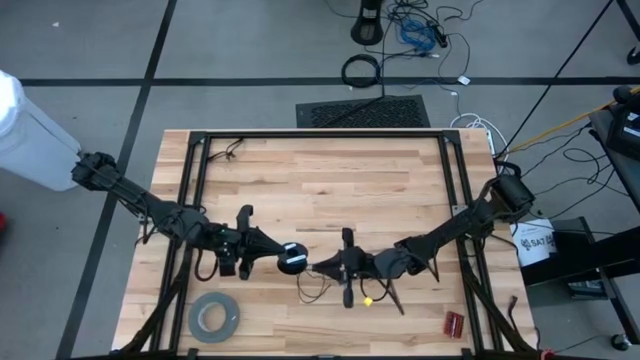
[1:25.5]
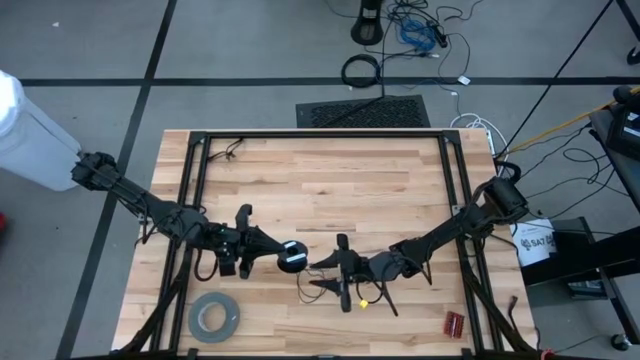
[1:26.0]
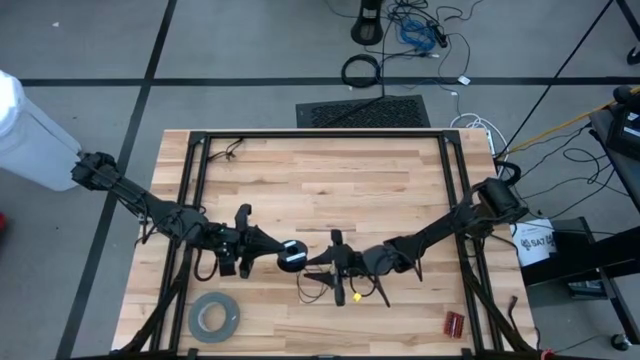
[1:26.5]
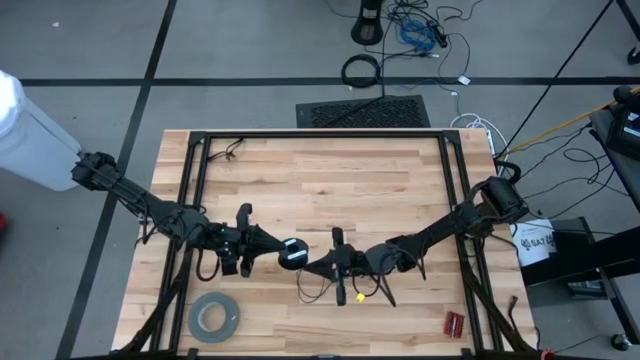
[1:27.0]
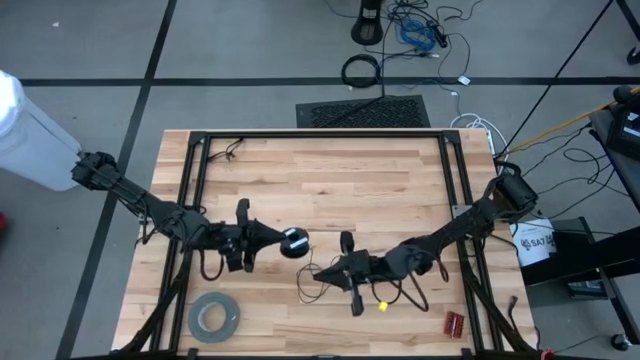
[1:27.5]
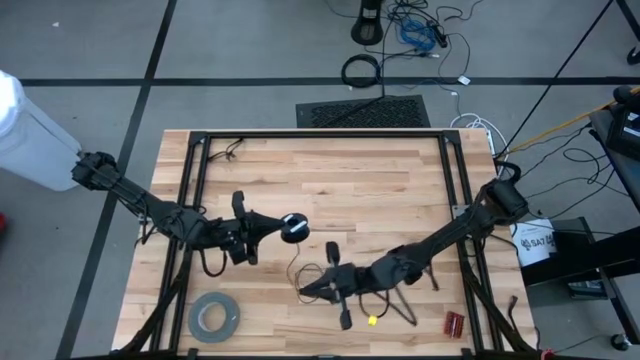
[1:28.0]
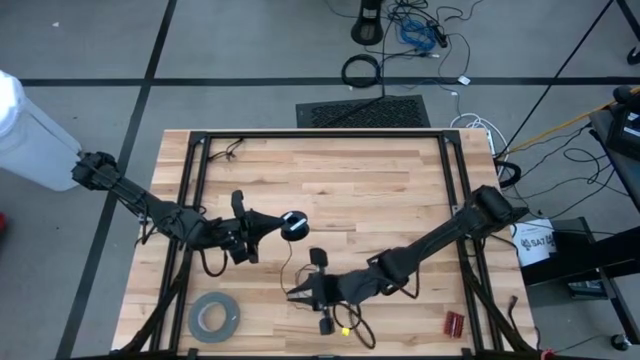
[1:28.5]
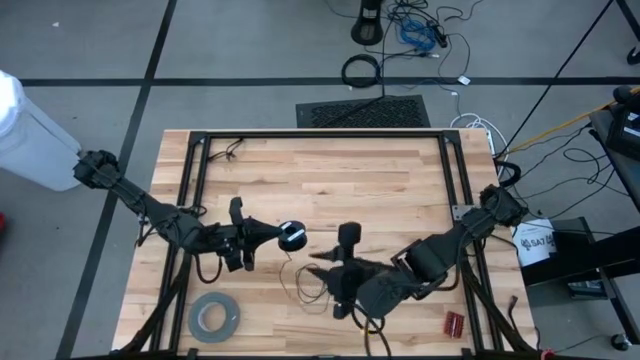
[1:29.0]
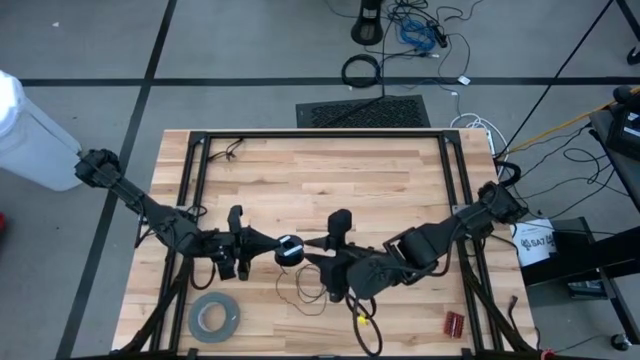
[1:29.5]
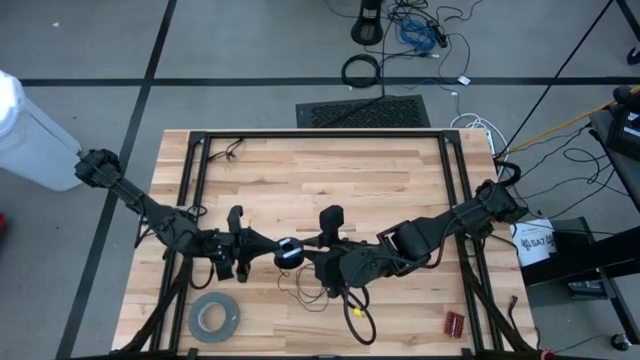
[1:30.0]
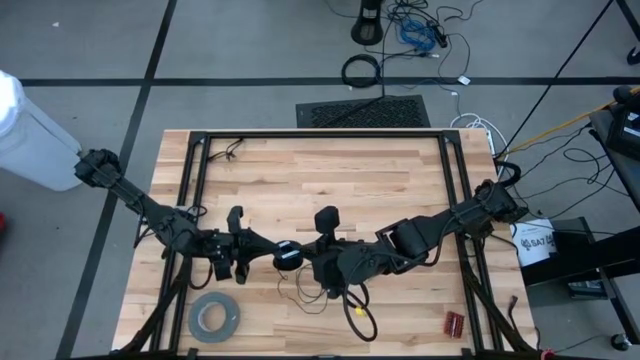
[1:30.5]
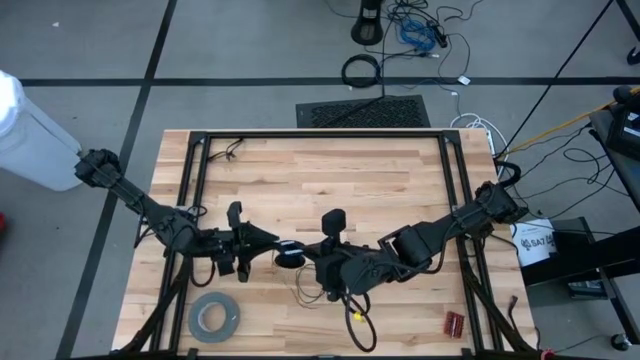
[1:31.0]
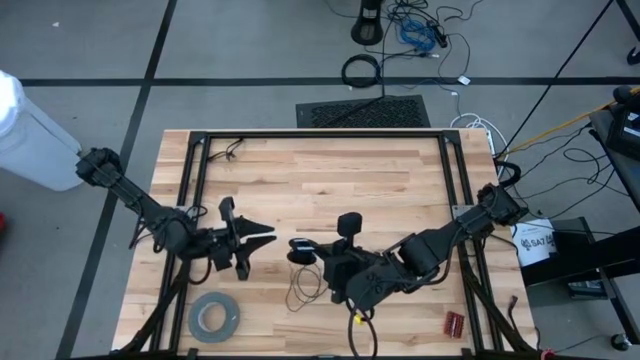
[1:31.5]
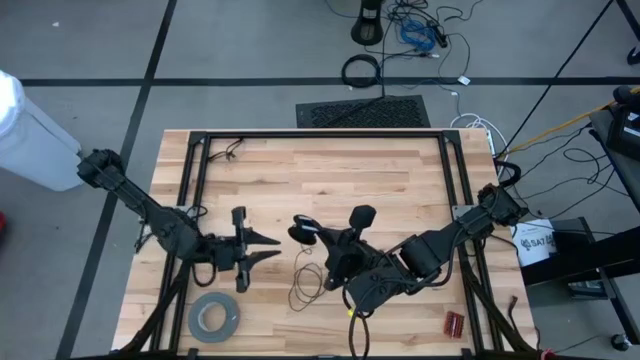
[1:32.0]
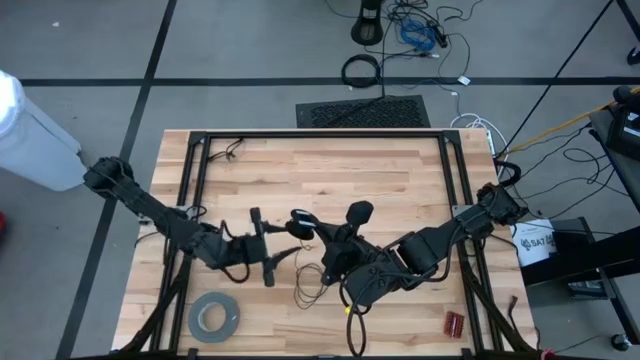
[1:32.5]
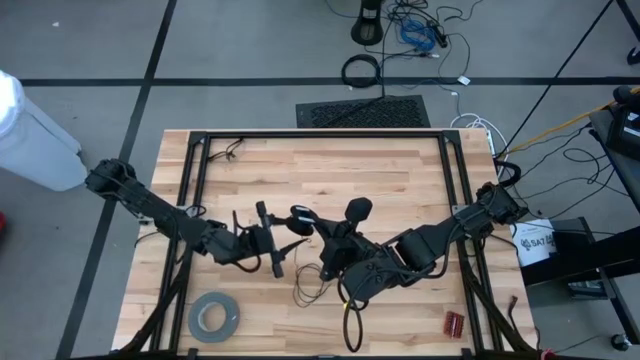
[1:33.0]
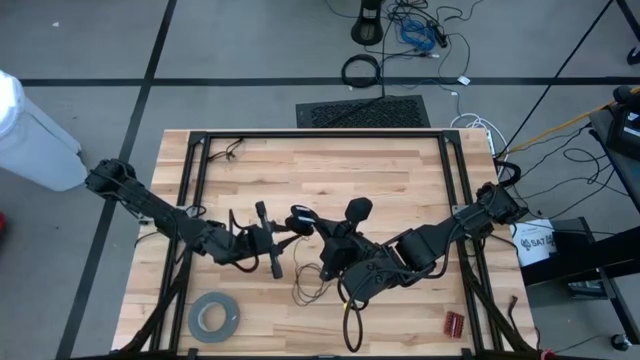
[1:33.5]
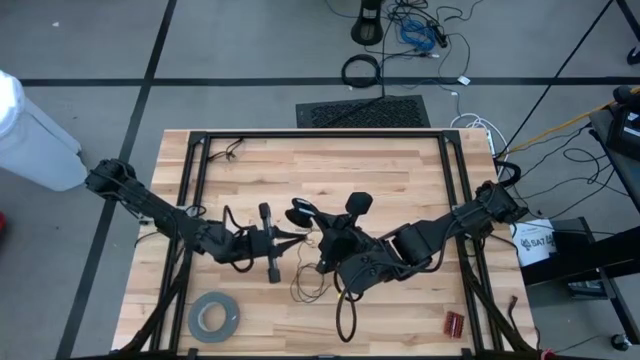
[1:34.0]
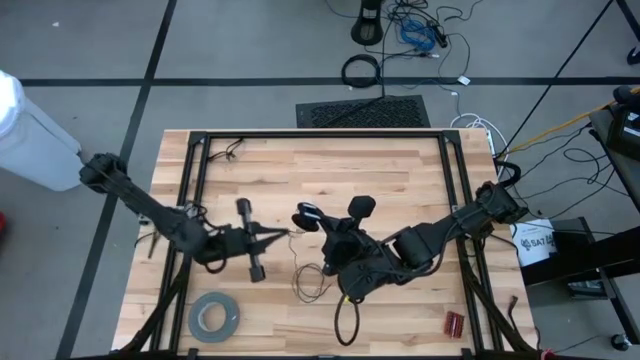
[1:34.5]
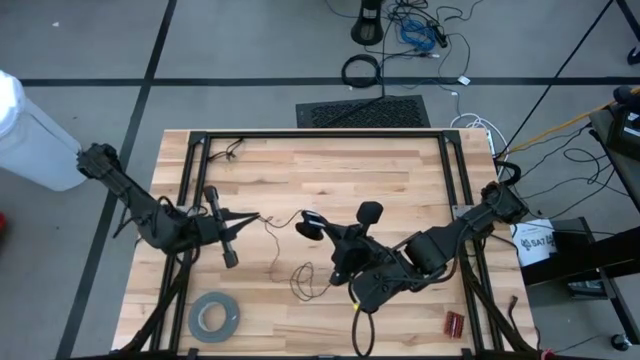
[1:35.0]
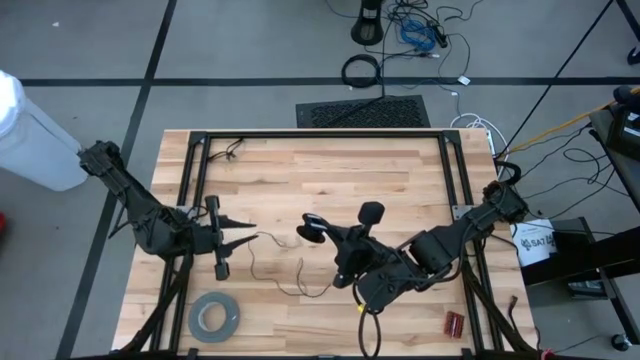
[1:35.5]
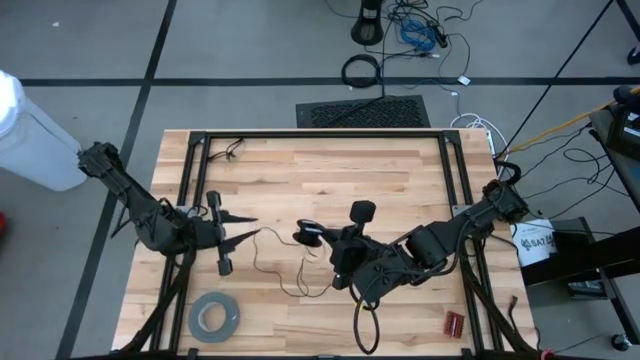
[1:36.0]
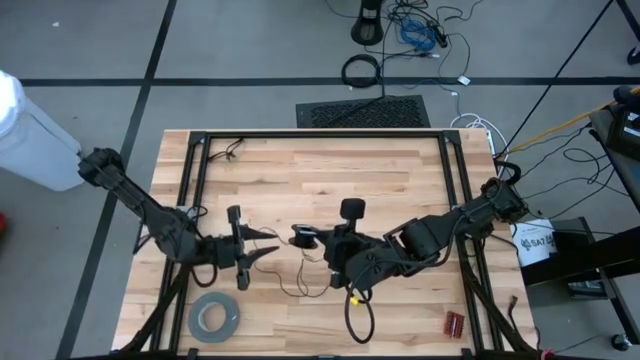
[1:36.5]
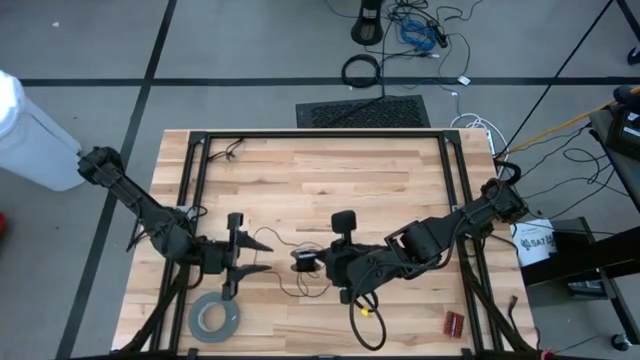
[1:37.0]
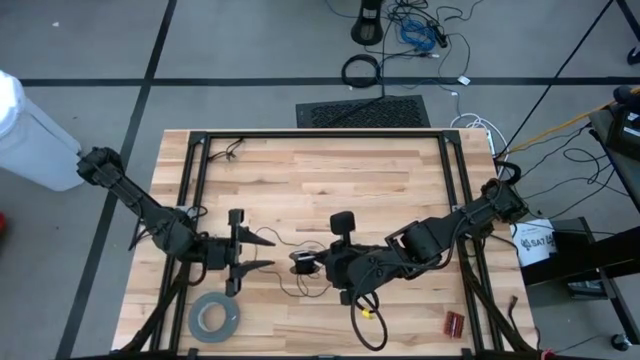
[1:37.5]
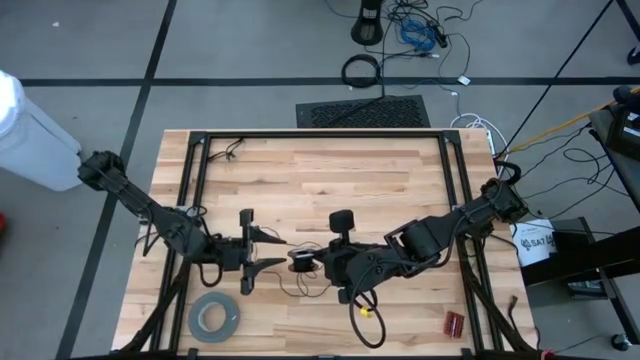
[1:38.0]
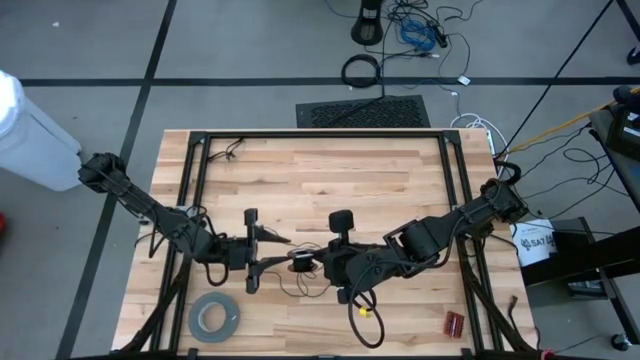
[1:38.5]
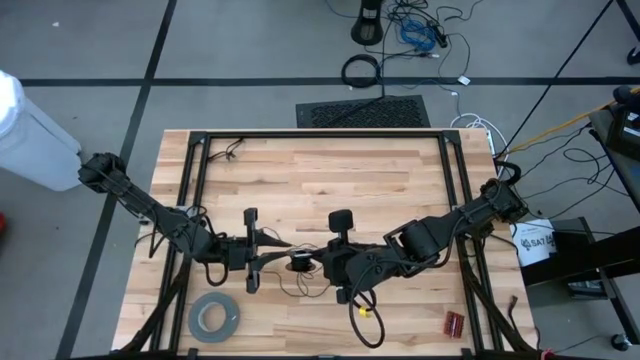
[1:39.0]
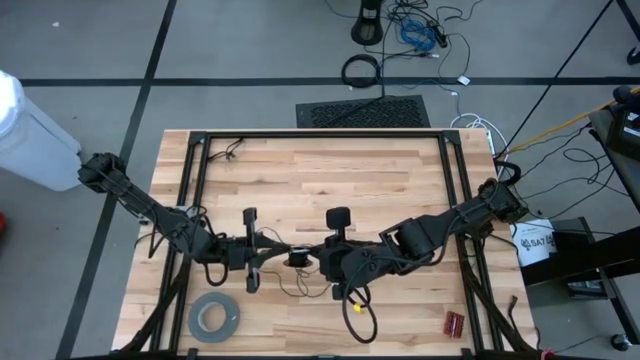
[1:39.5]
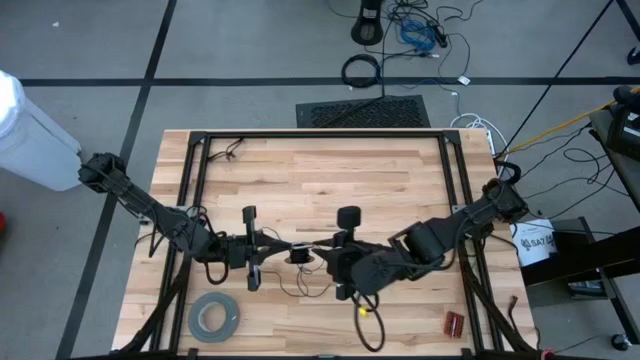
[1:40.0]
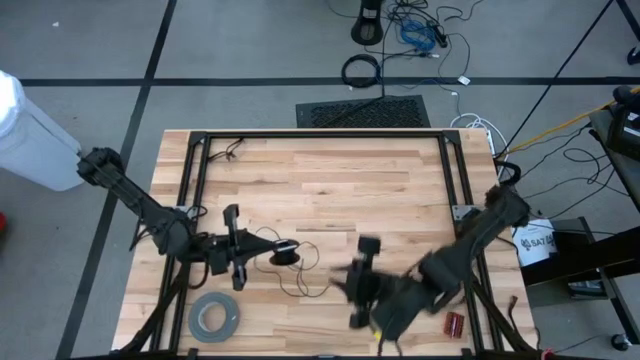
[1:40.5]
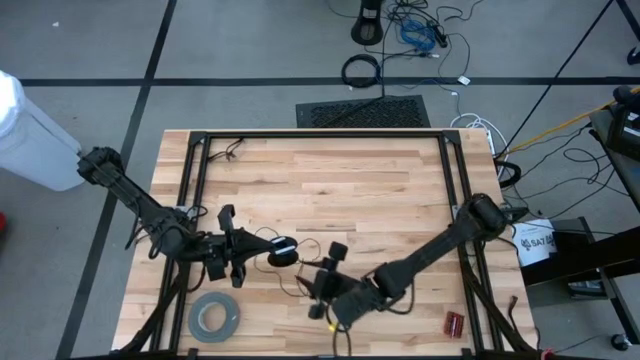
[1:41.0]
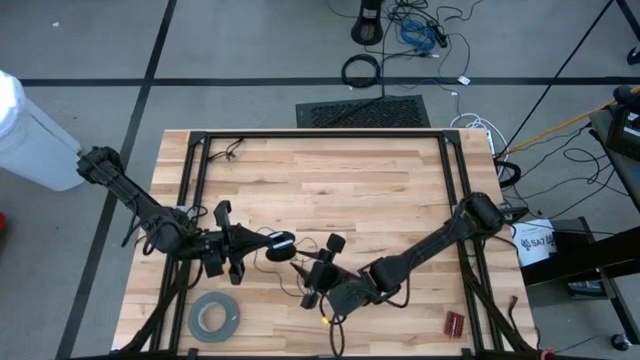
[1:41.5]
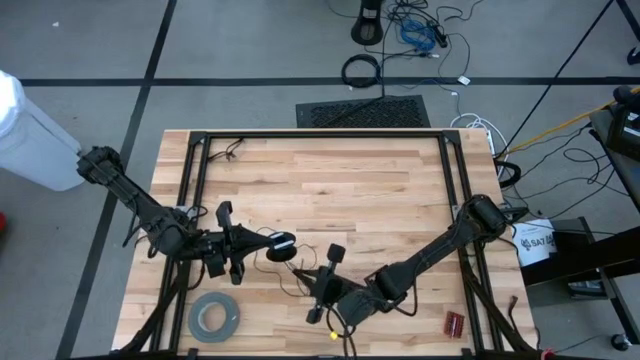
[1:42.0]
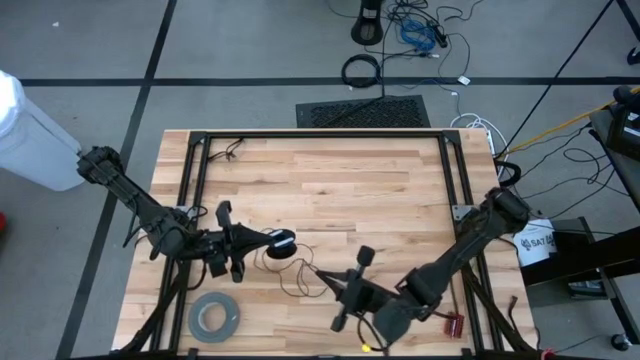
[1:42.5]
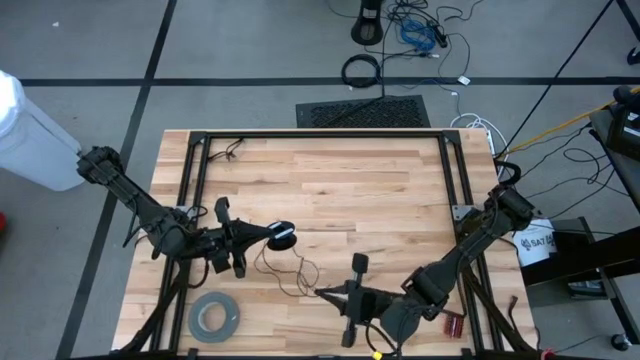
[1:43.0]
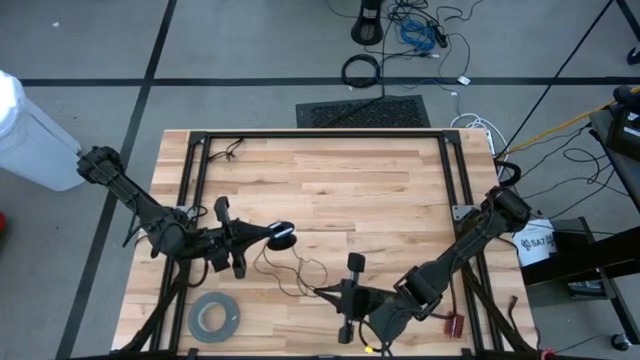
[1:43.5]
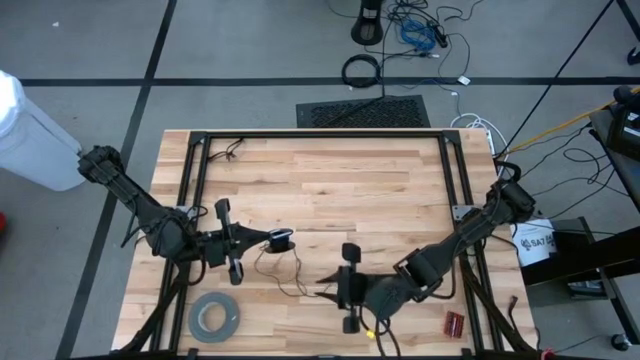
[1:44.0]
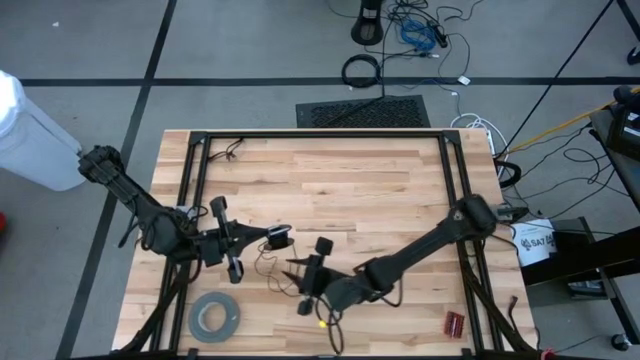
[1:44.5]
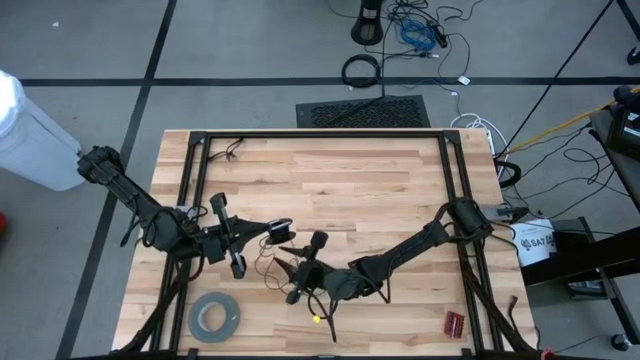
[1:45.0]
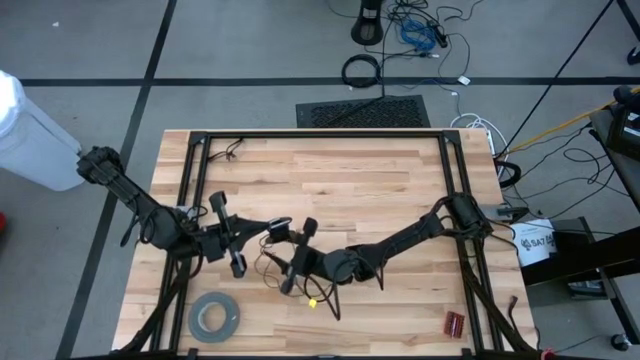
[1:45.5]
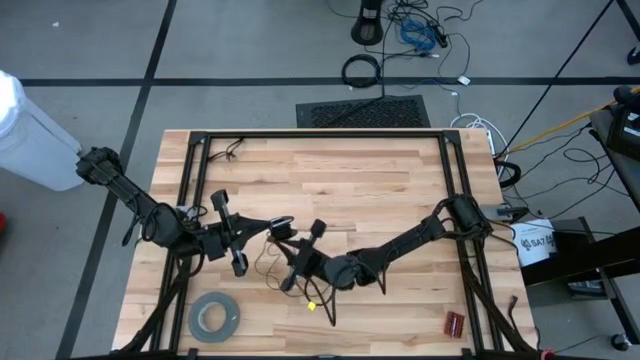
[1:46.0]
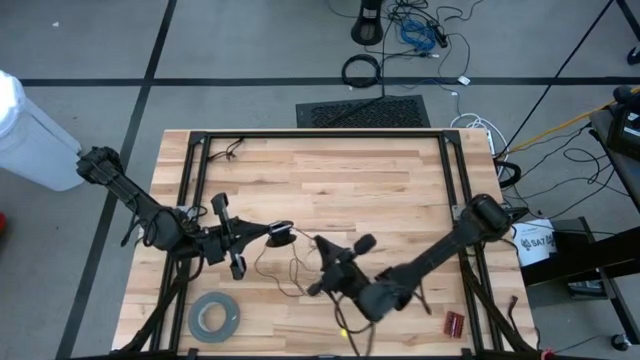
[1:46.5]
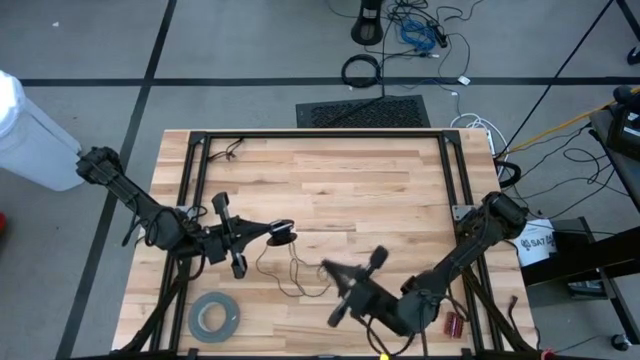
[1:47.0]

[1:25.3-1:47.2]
Task: Coil cords
Uncoil the black wire from the spool
